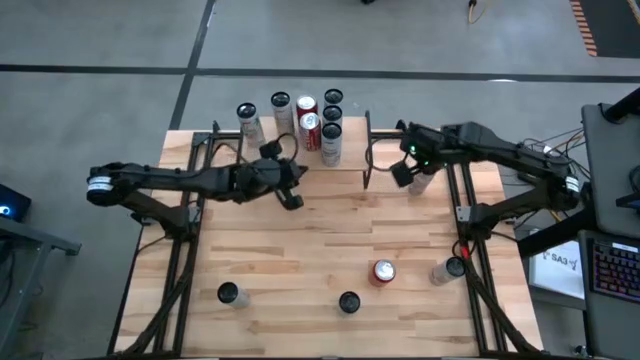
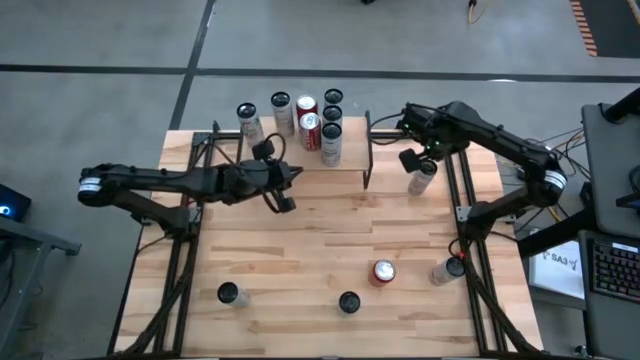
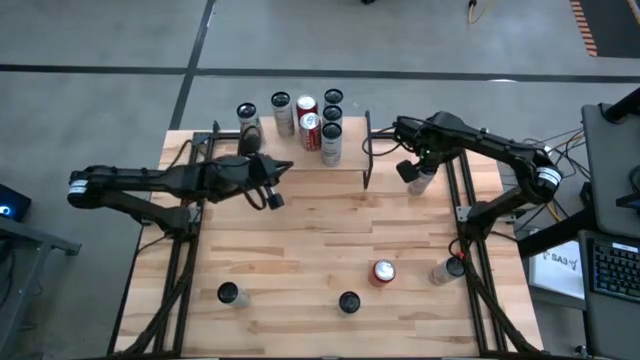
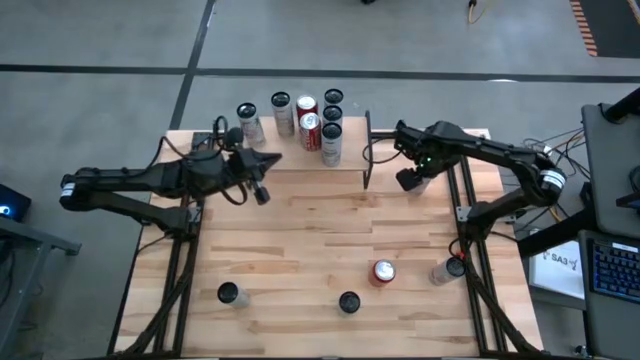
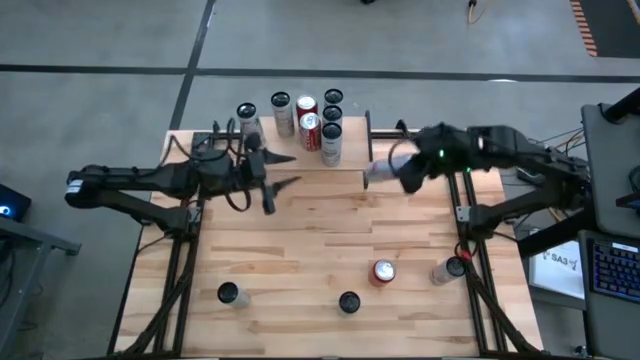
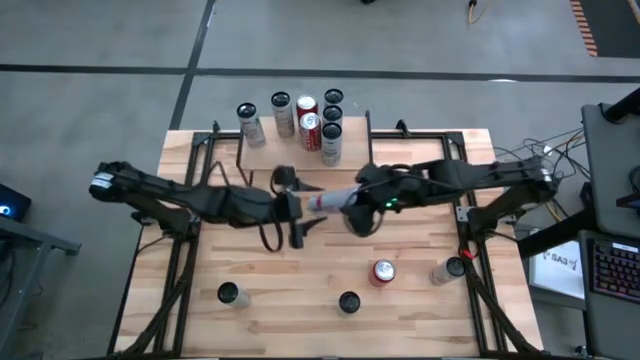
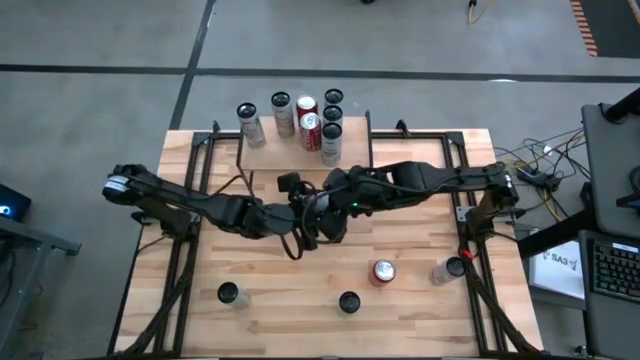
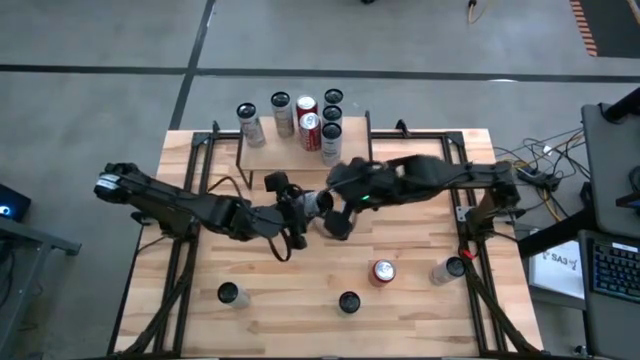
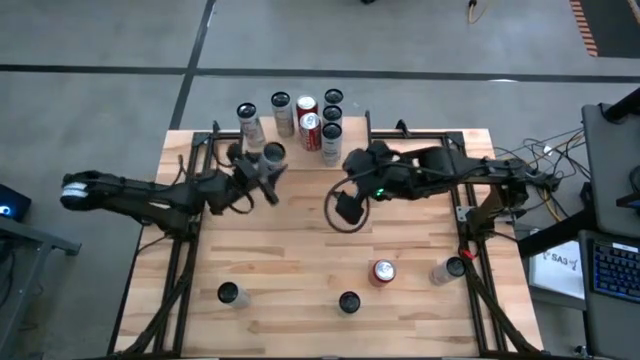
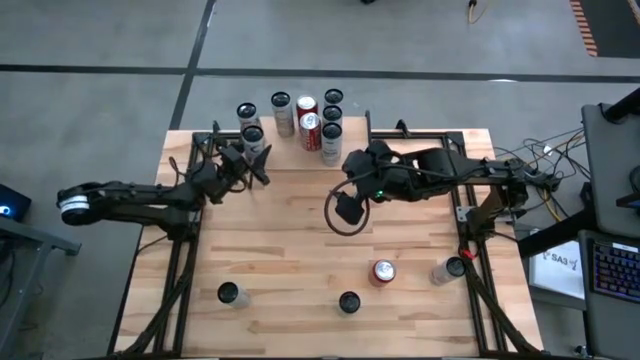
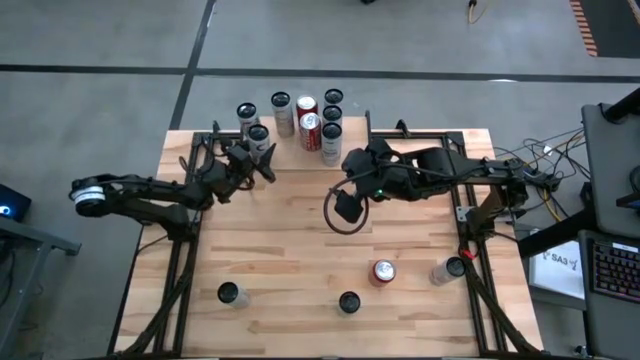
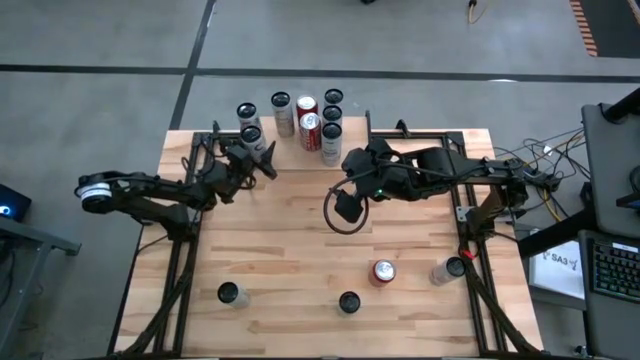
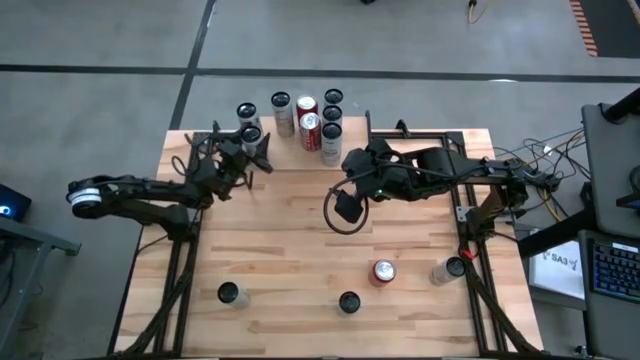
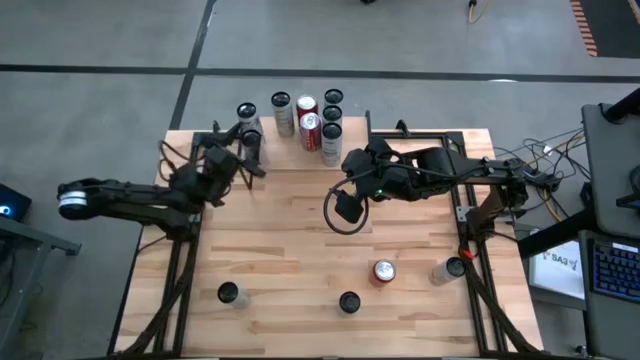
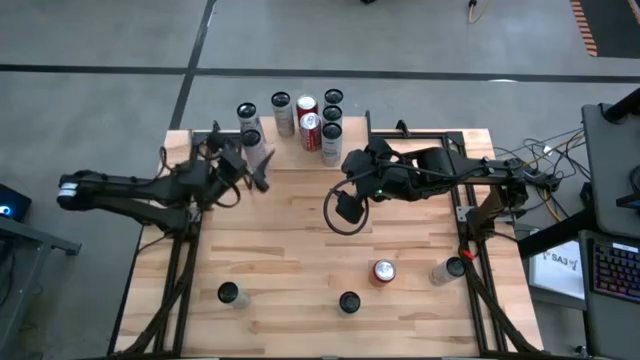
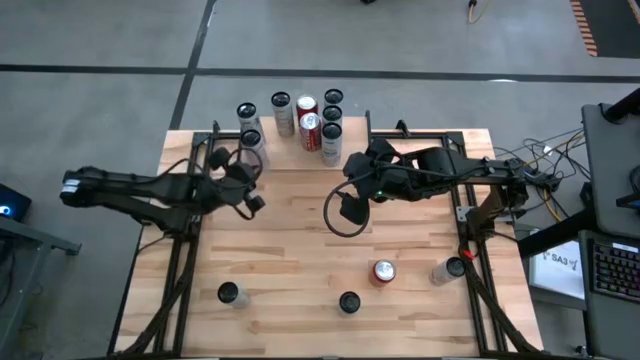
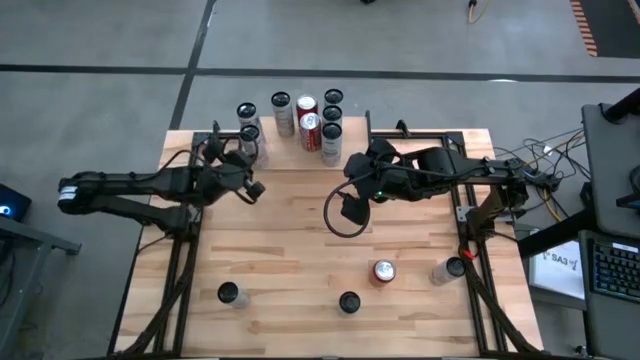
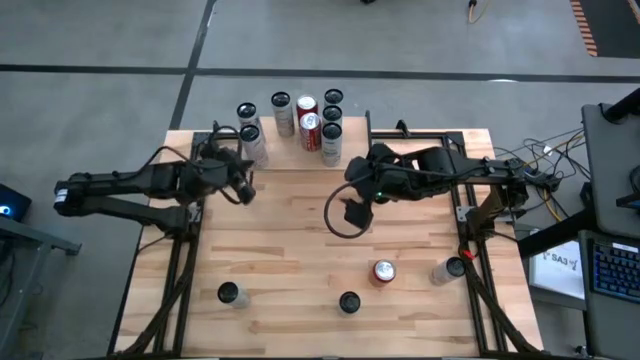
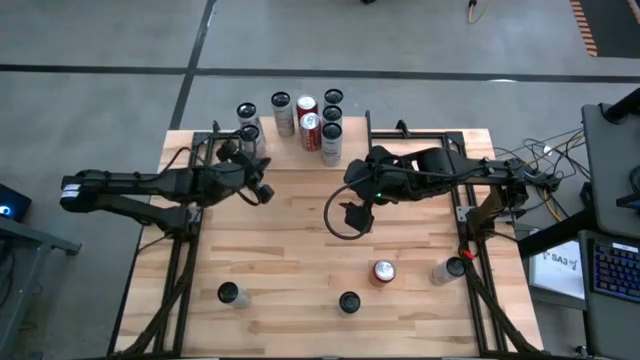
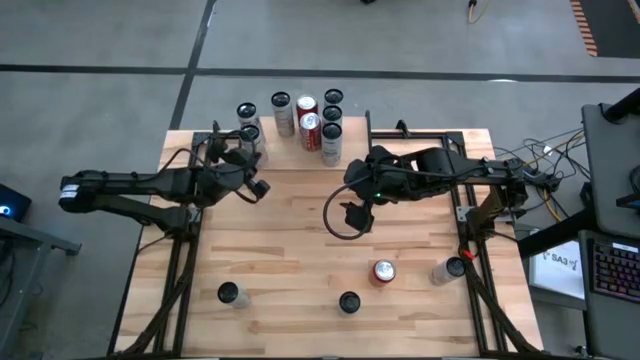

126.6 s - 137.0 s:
Task: Place canned beverage on shelf
Put the white soda can aligned with the other white soda can on the shelf

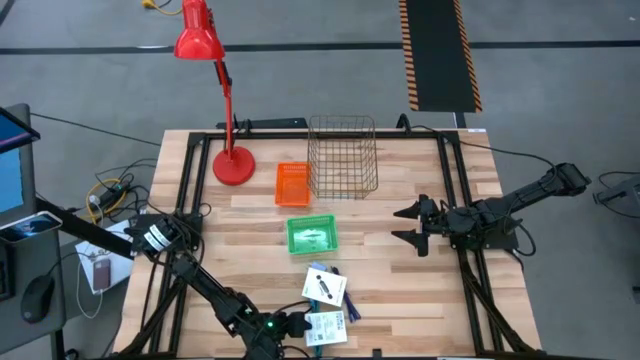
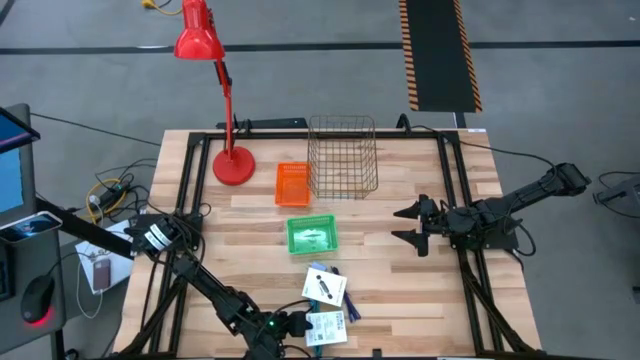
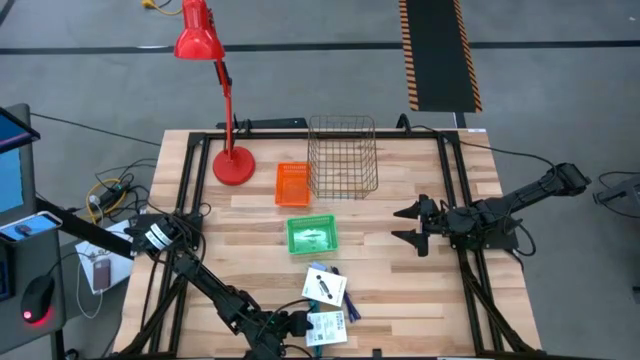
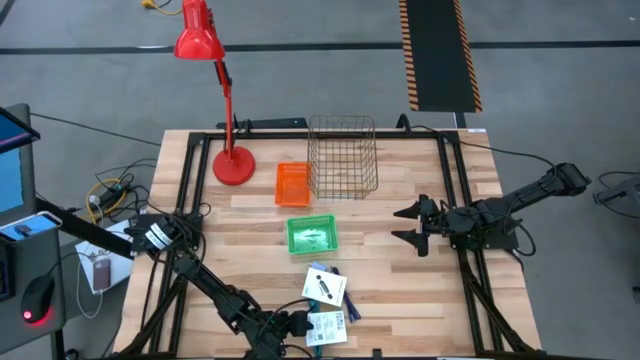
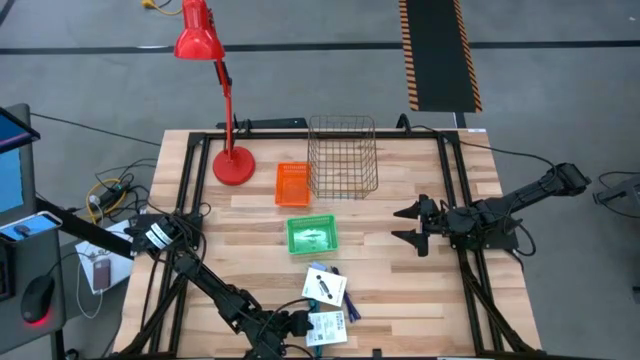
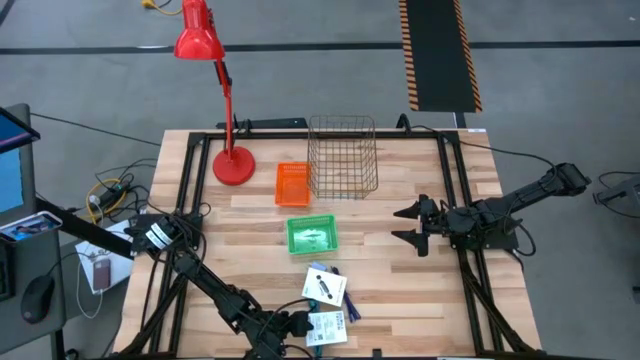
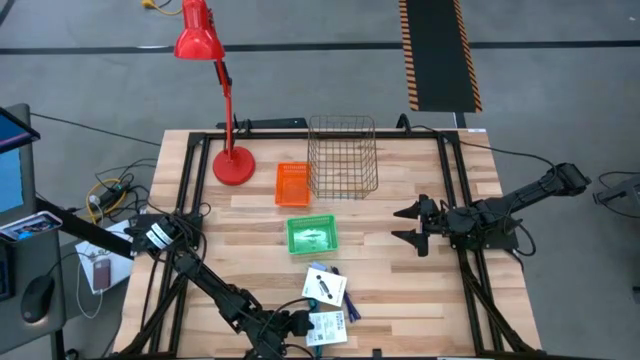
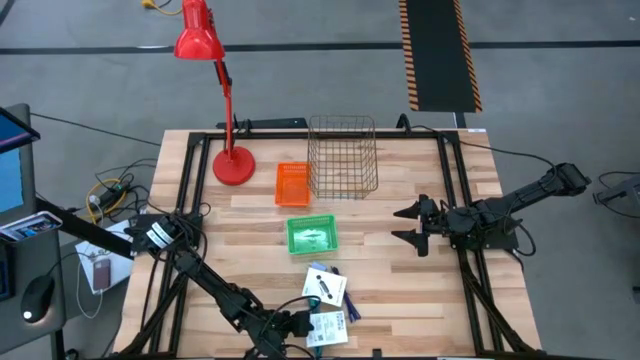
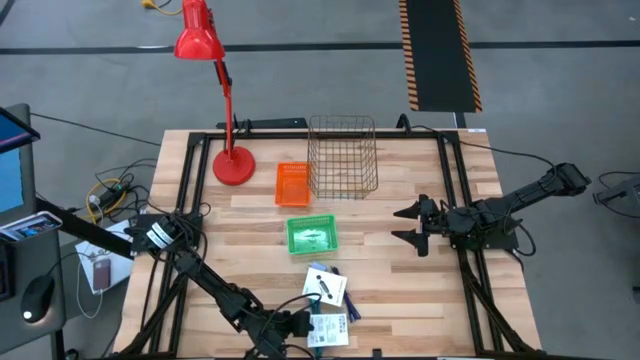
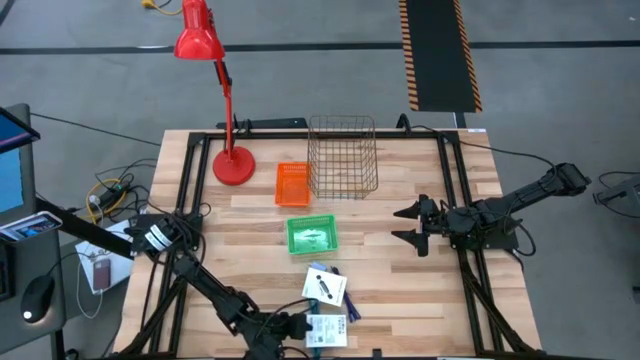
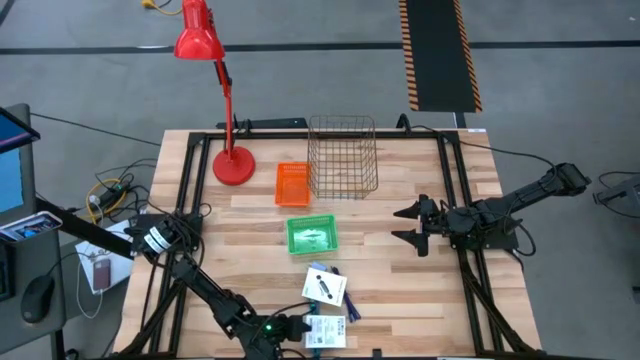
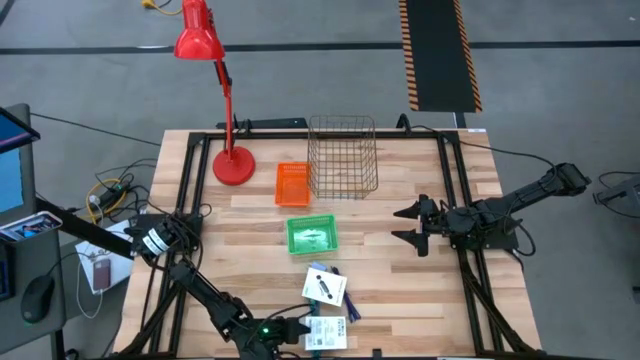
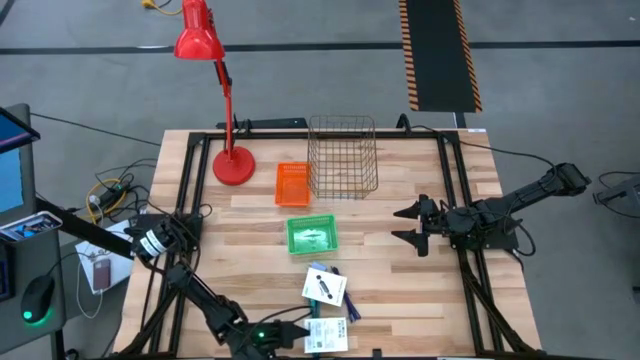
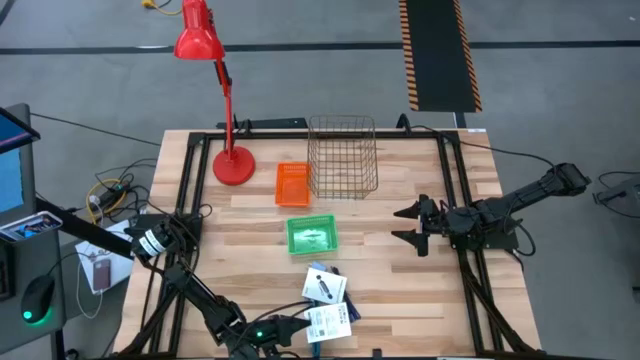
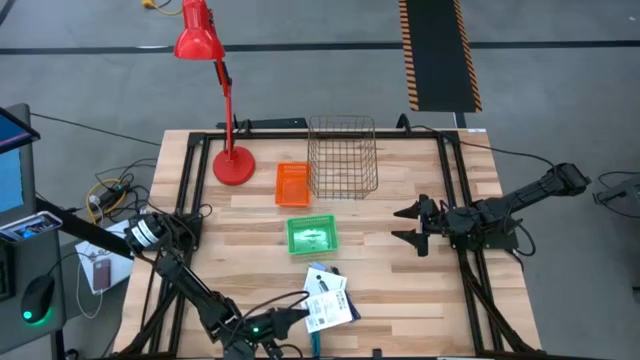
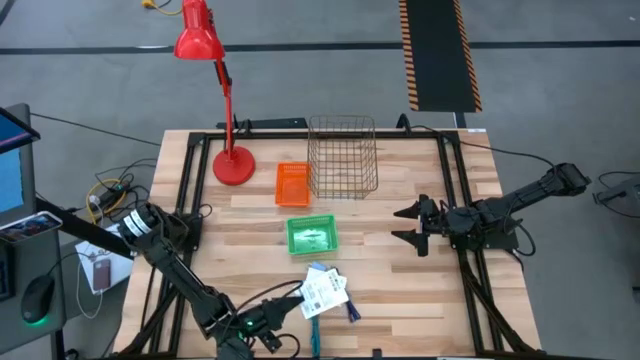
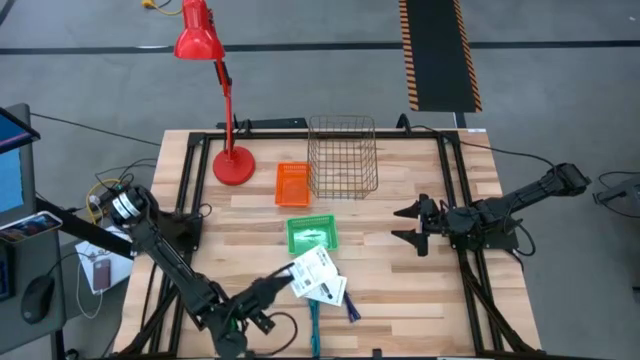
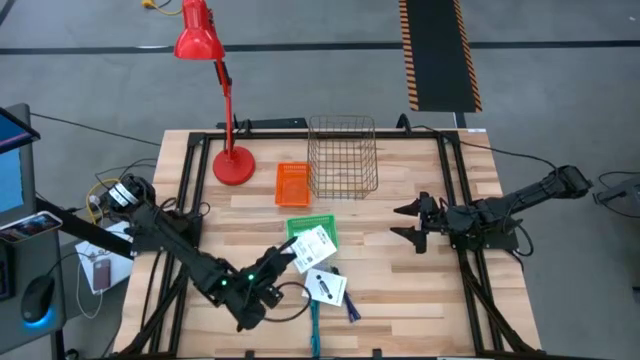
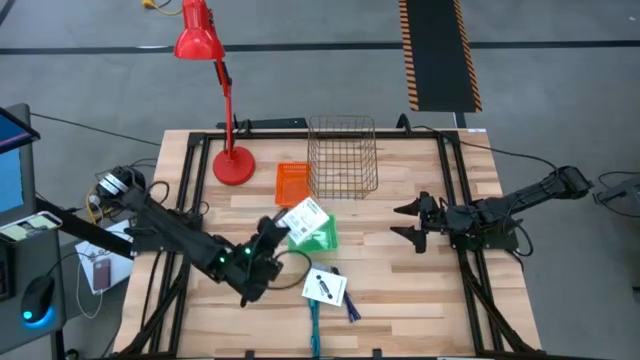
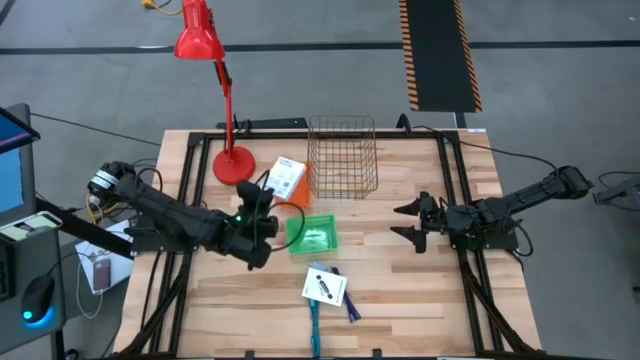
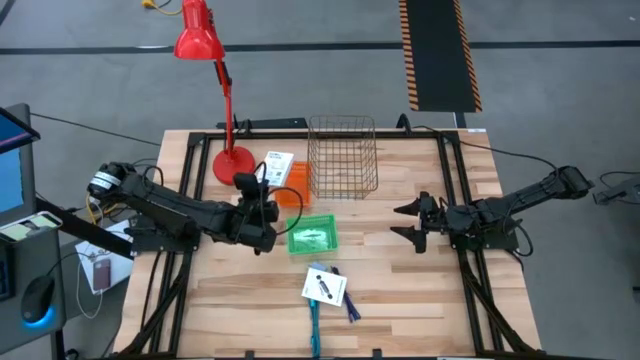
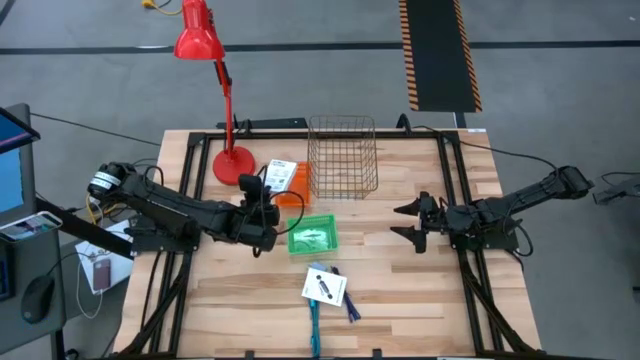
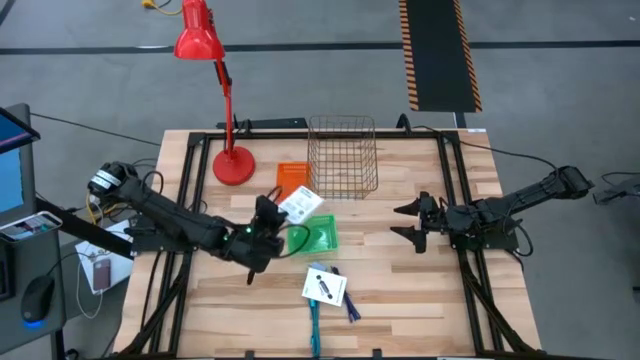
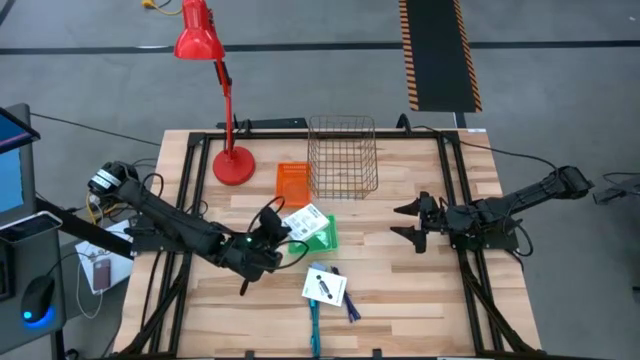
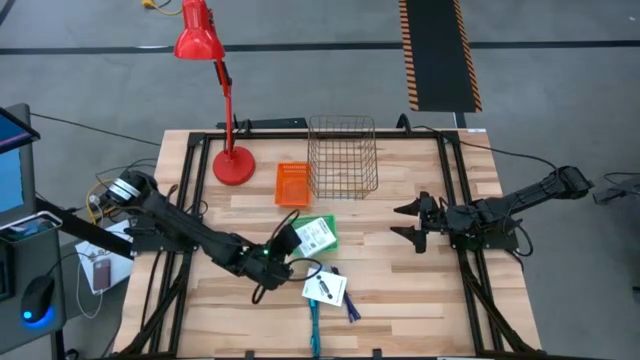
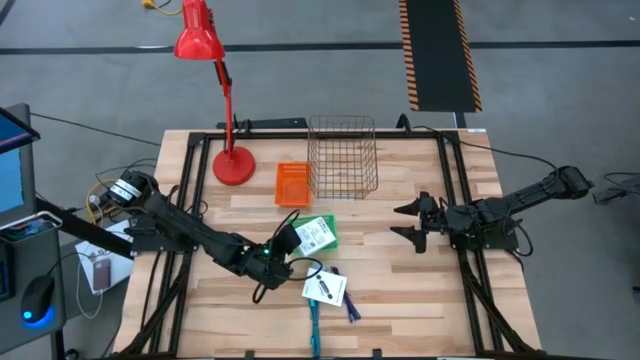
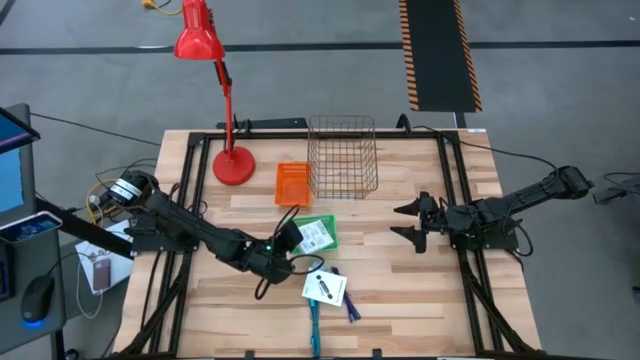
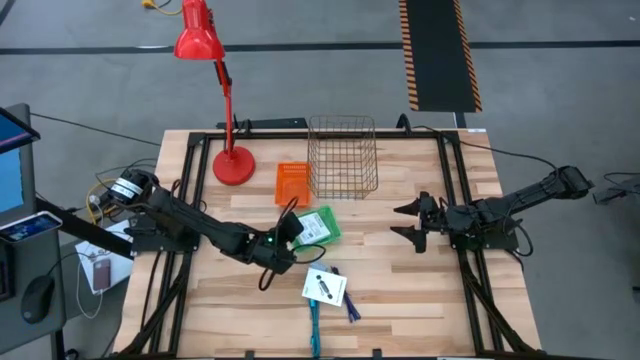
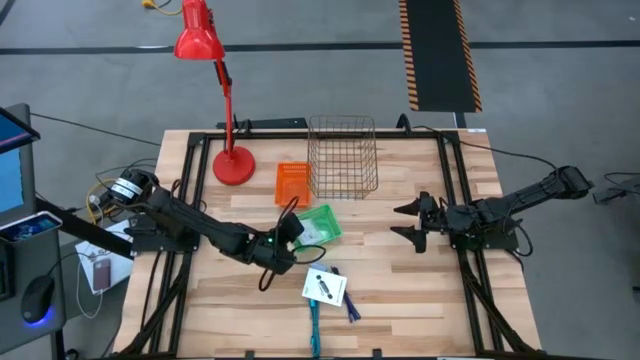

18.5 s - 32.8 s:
Task: Pick and place items into bin
Put the top card reader box into the green bin
